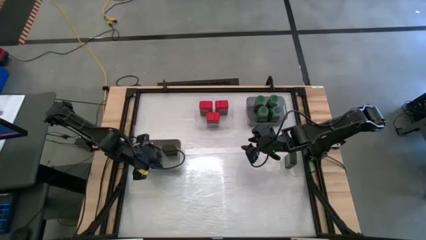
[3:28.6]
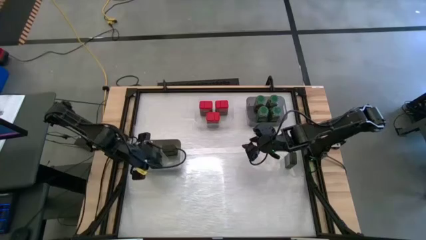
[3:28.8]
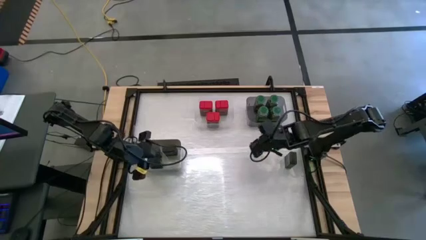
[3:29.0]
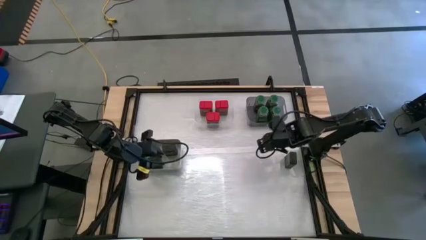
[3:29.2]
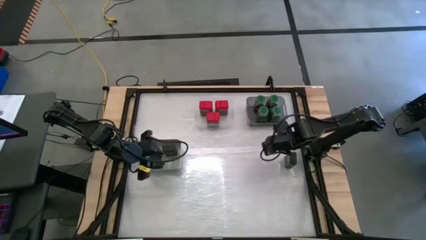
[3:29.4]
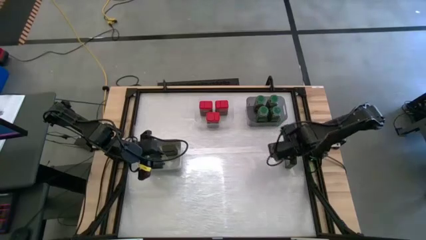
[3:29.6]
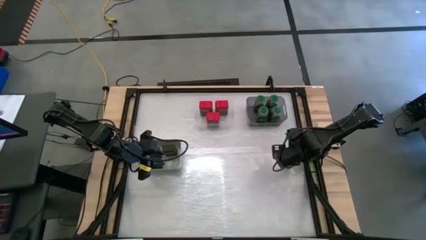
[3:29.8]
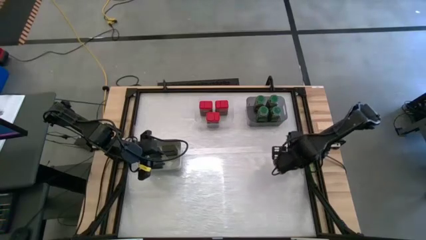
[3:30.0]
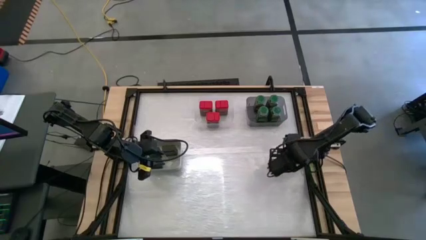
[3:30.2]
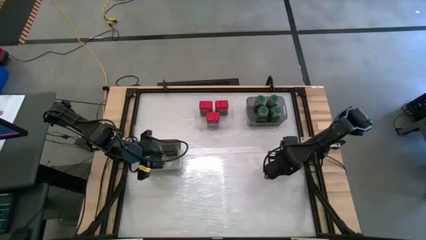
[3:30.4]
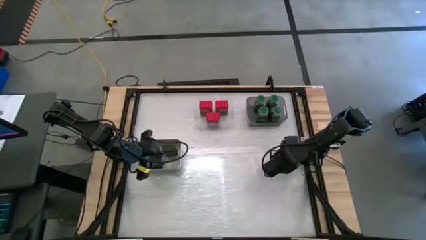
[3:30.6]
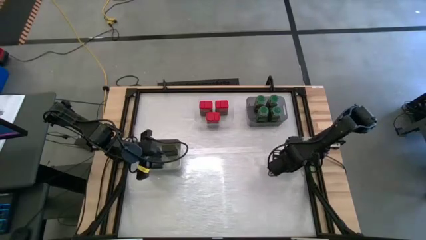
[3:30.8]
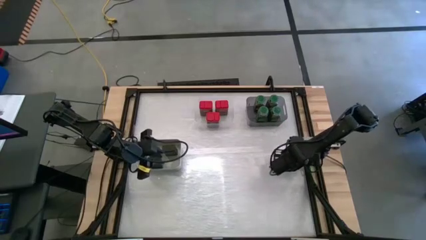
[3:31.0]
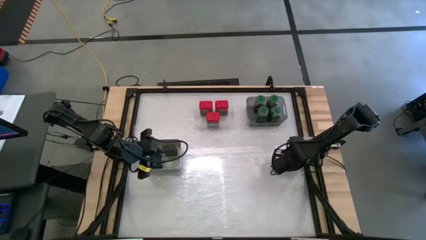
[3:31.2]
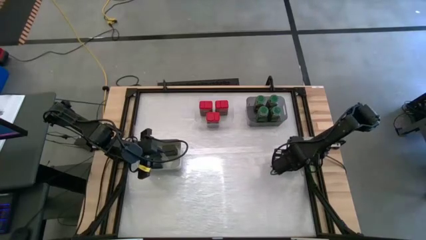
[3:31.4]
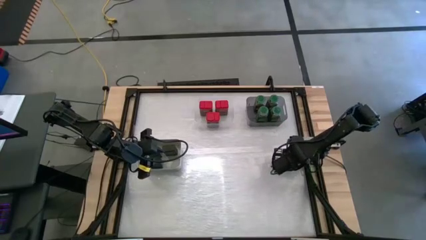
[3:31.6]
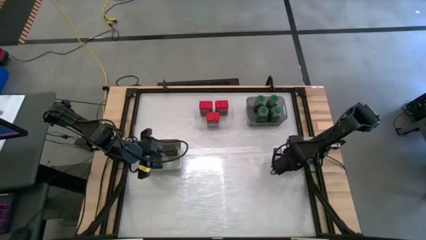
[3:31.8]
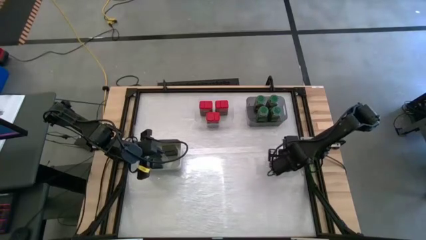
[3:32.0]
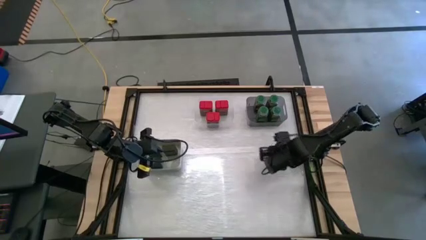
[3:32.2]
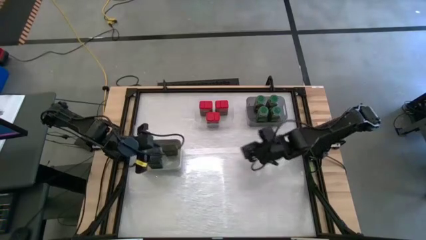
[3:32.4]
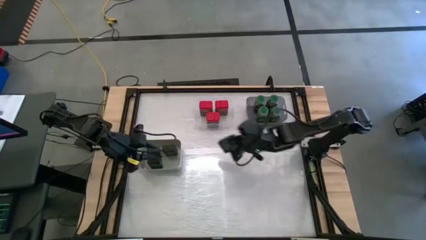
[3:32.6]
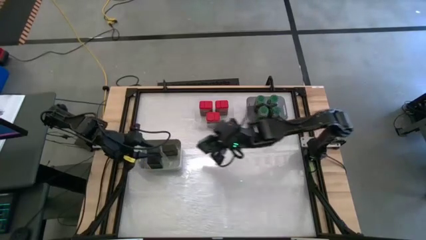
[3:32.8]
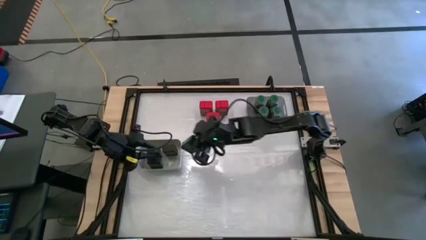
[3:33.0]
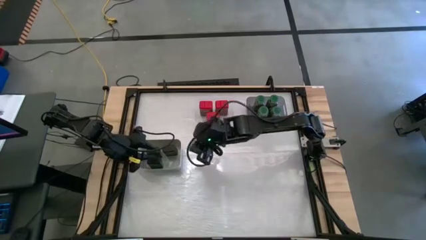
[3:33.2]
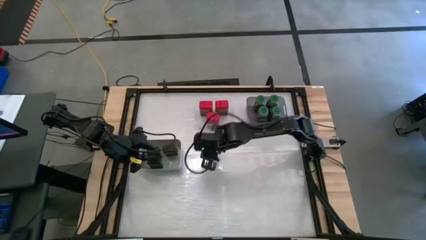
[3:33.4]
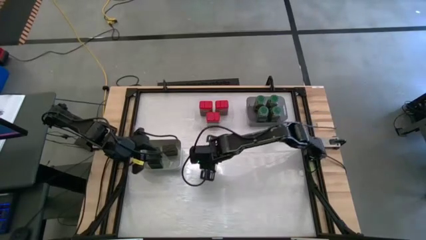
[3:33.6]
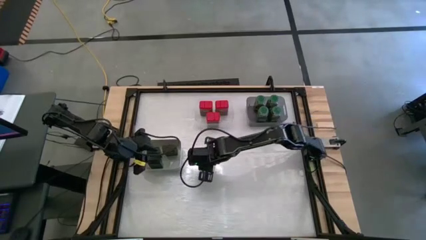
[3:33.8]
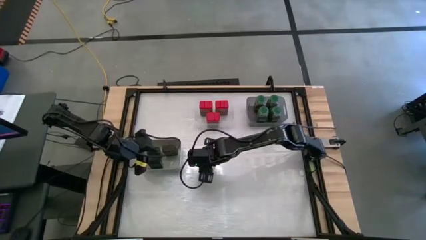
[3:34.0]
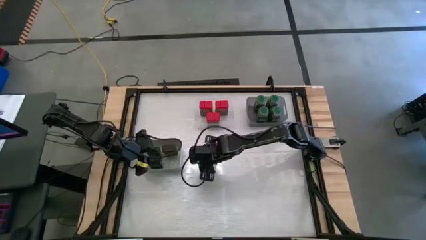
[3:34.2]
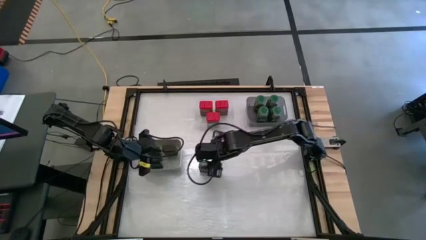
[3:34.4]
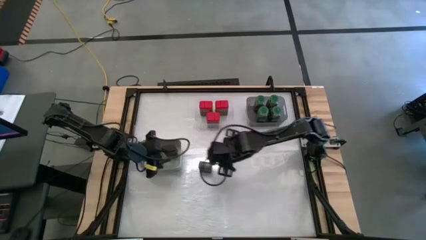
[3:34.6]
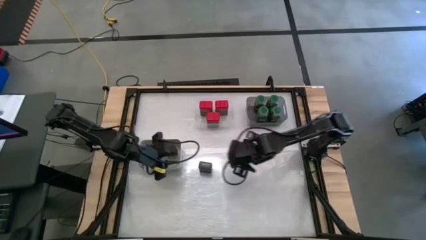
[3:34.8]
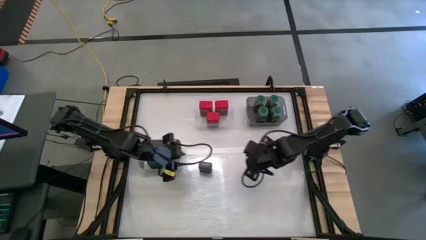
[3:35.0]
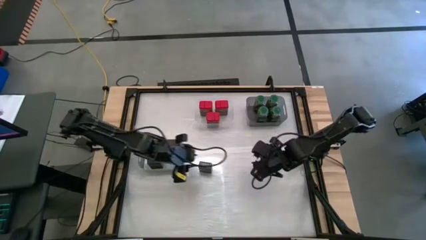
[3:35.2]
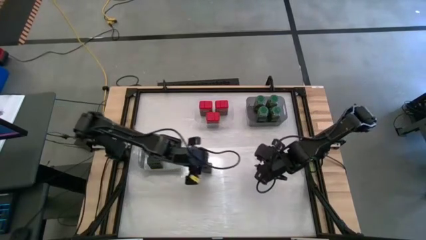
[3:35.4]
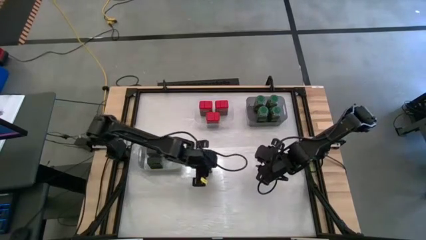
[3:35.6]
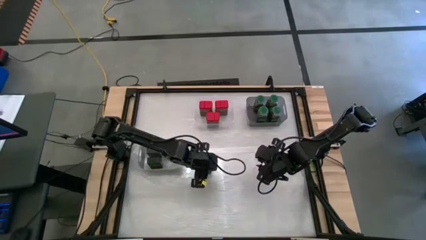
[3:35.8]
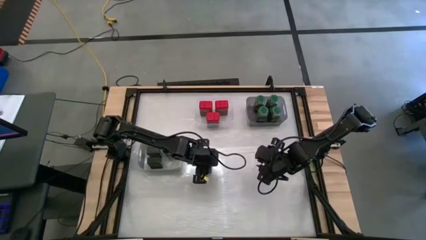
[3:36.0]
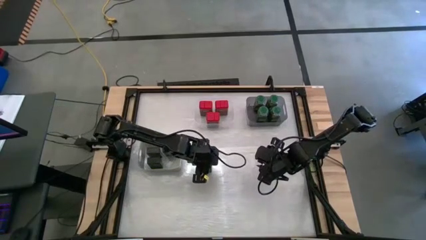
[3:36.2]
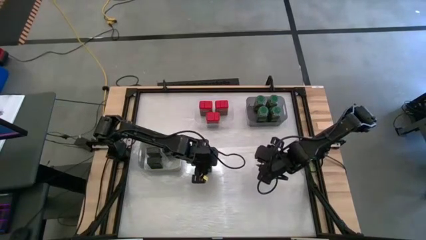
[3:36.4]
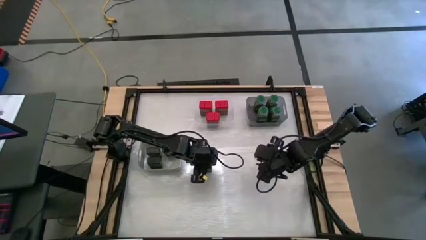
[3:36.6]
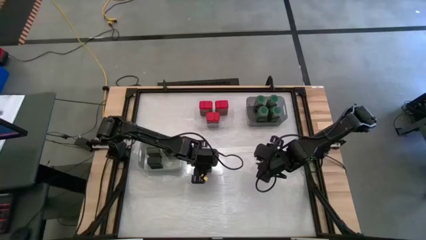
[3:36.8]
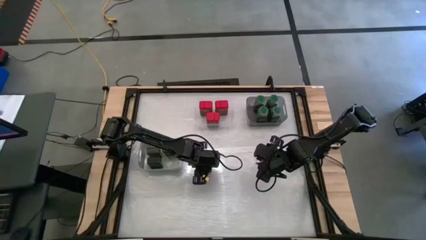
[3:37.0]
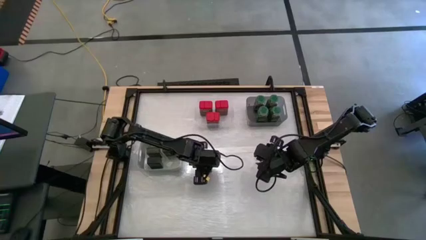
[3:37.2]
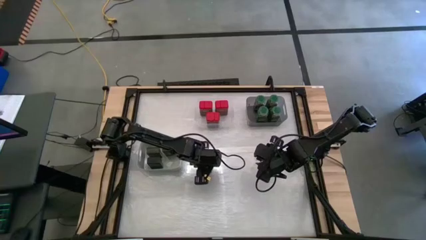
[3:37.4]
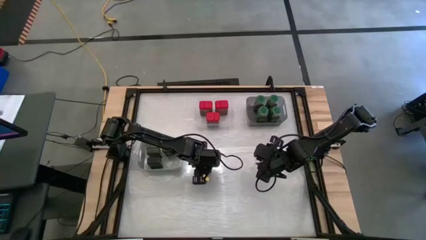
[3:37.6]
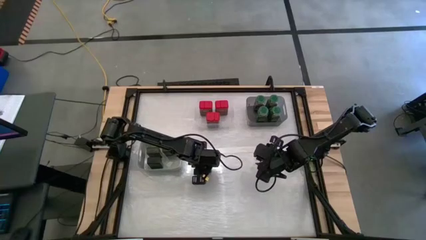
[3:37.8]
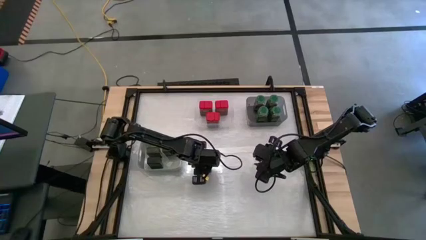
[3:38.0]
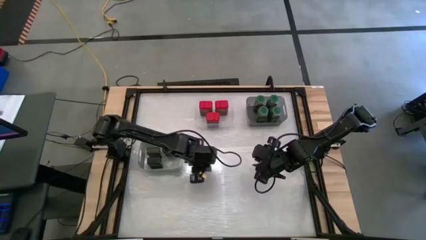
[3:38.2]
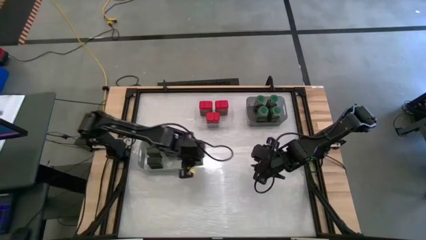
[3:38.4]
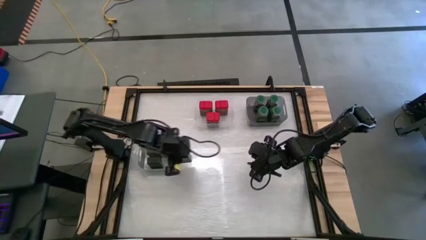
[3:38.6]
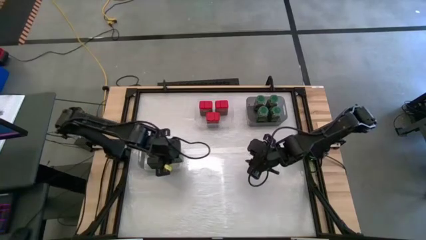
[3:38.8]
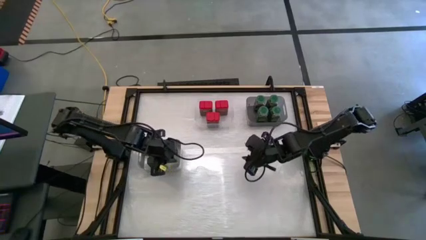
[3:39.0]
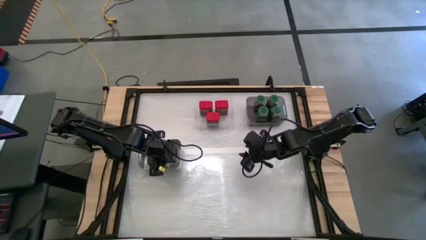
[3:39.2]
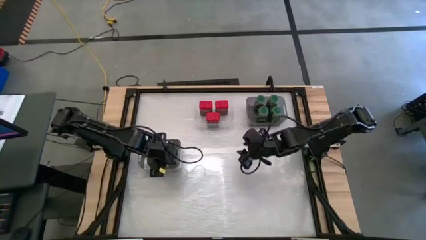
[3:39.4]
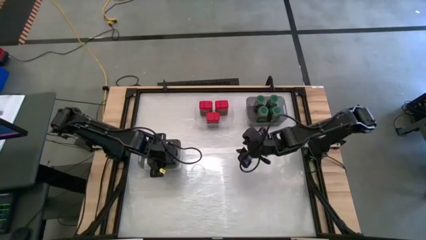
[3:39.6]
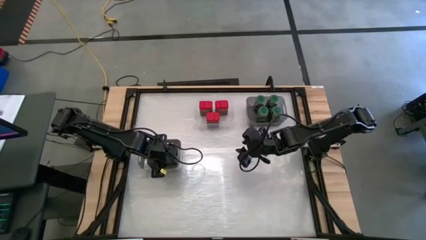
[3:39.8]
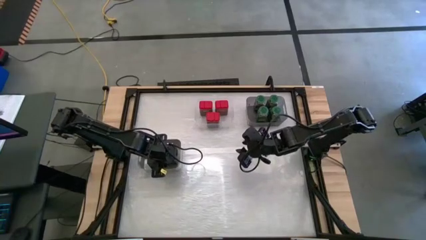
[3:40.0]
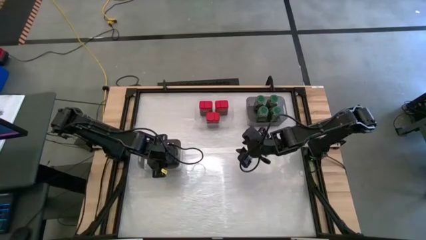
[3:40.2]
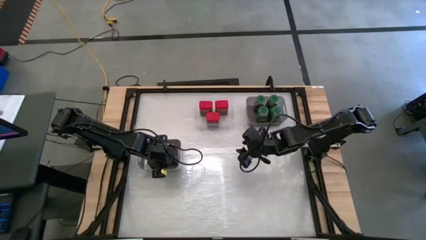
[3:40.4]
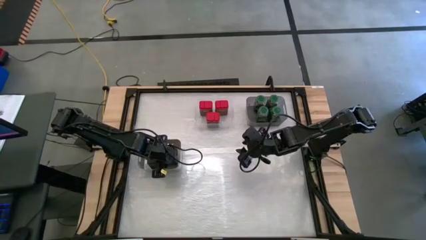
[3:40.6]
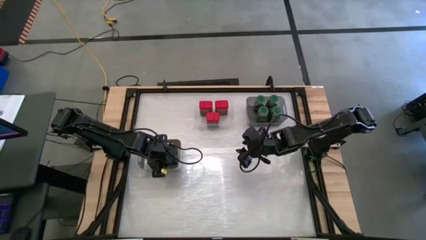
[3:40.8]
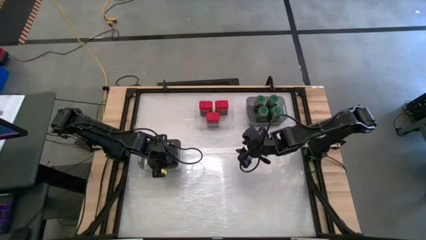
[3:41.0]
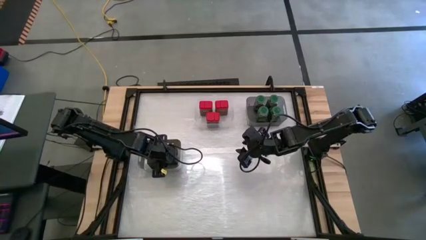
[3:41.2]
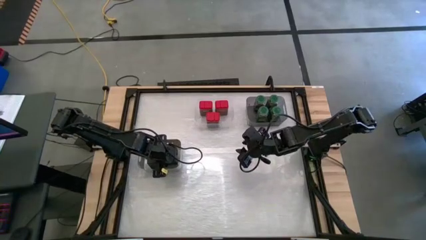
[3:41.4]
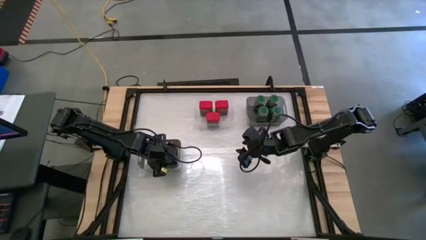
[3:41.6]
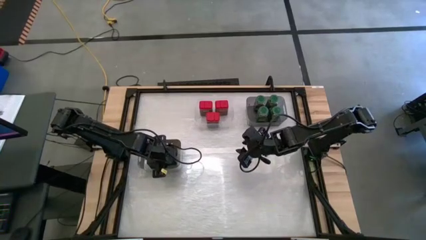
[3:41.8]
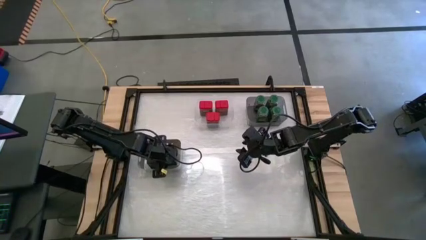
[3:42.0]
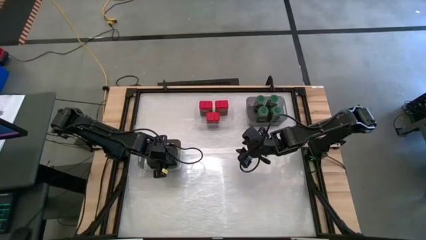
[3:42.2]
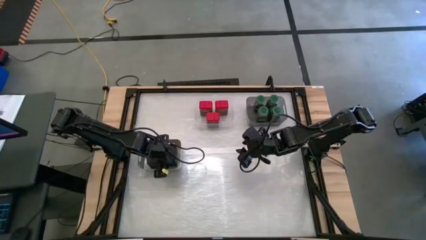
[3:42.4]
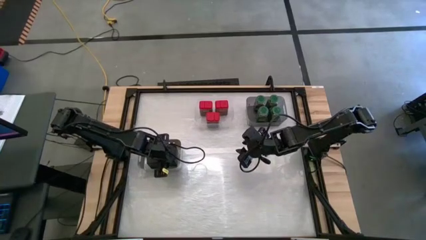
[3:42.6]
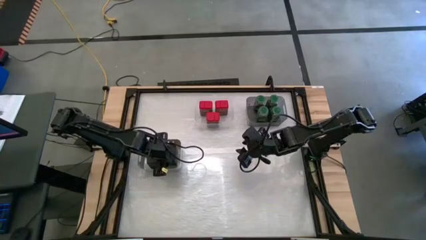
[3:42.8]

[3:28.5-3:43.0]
Task: Sort spices by type
Put the black seasoning bottle into the gray bin

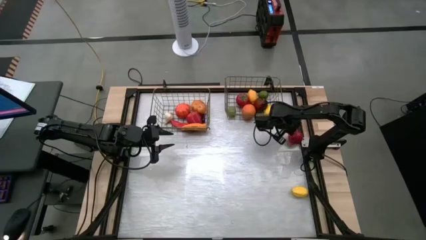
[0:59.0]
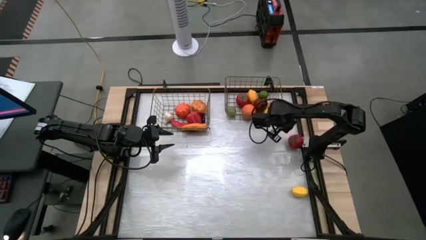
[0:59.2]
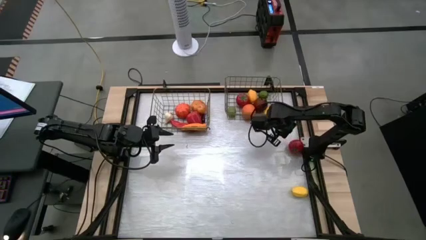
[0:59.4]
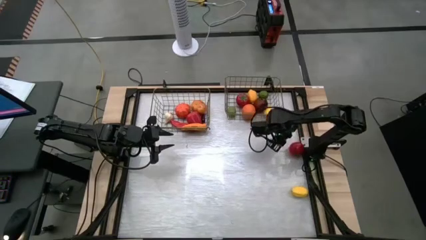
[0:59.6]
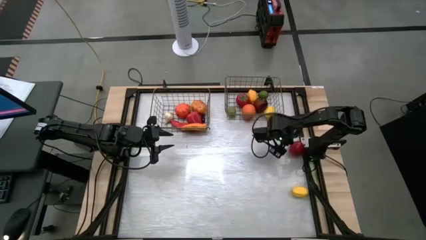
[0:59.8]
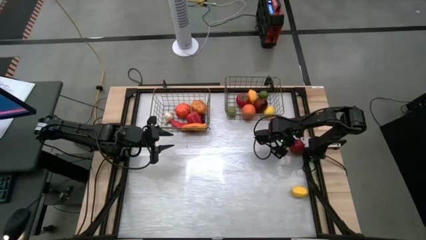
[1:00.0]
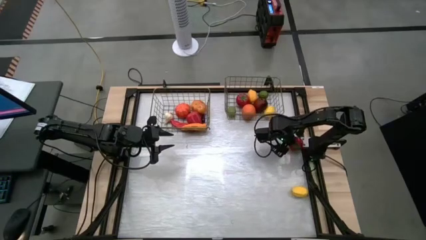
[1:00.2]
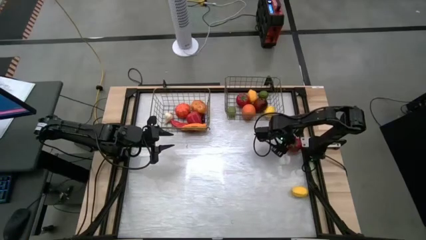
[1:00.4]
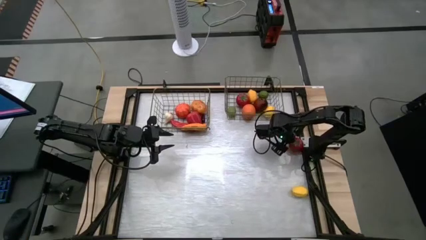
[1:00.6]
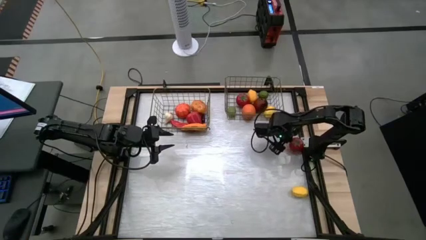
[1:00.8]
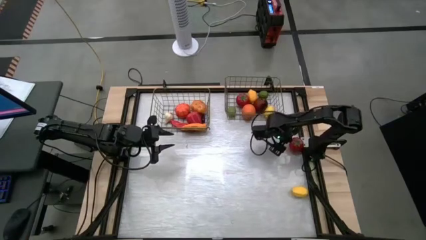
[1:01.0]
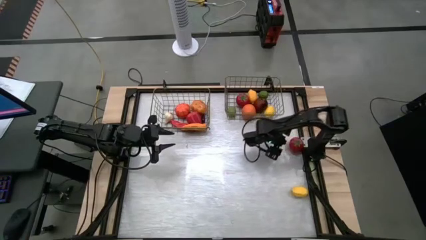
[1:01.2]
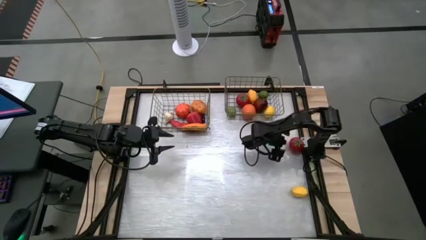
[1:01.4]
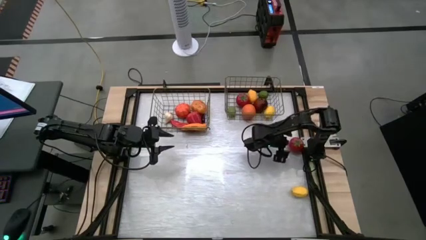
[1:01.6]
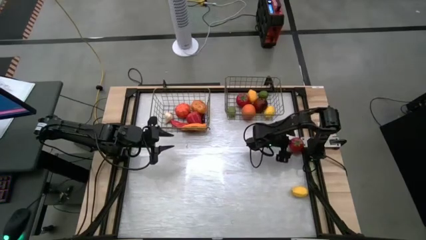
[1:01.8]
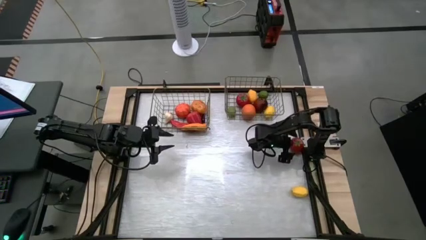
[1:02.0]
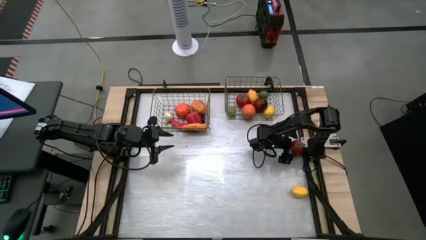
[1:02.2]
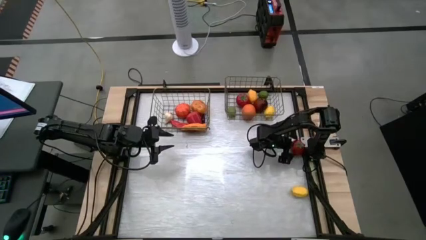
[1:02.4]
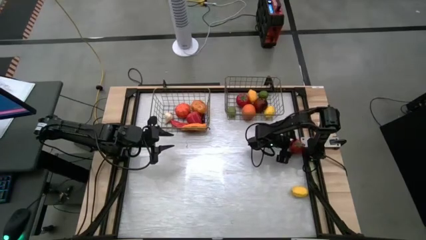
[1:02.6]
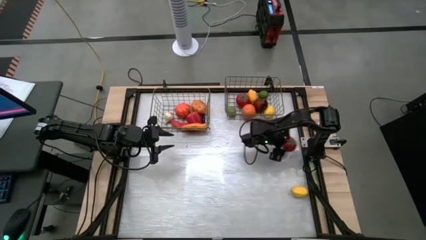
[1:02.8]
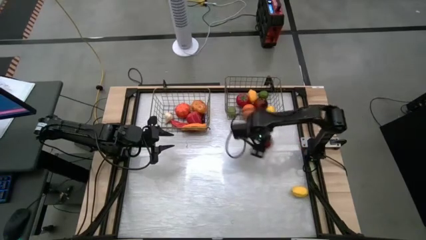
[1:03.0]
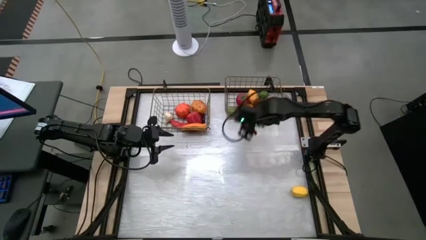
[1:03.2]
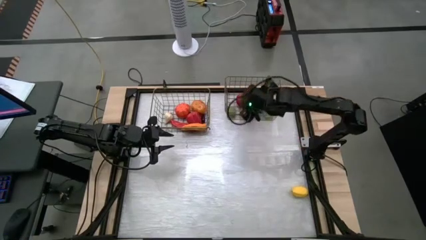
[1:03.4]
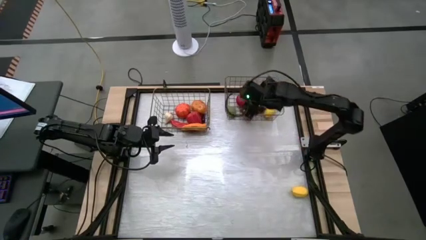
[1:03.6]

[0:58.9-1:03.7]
Task: Sort produce into baskets
Put the tomato into the right gold wire basket
